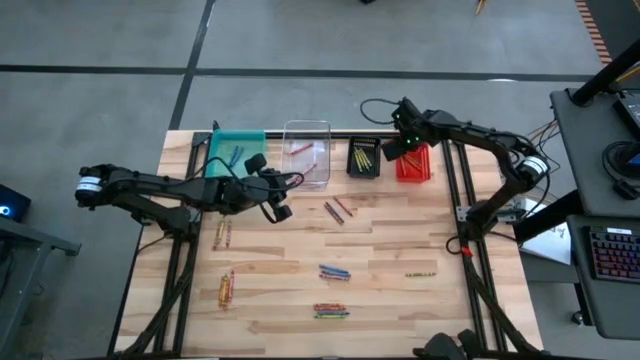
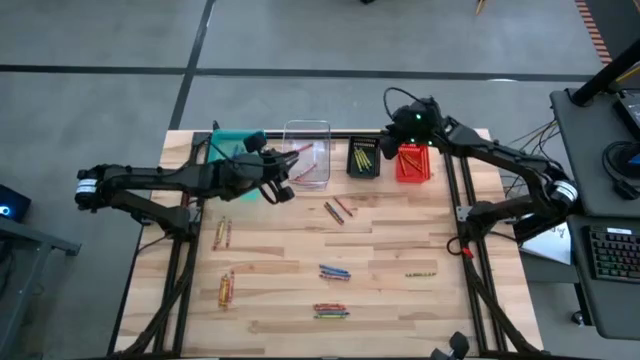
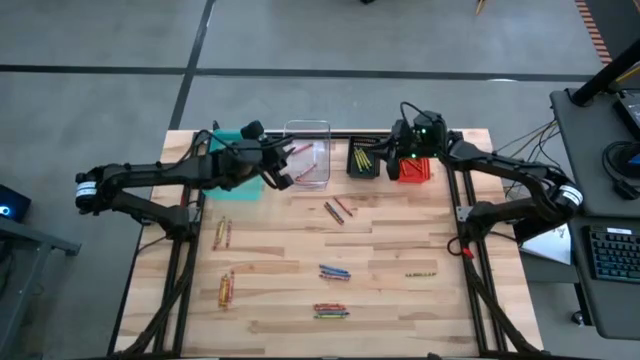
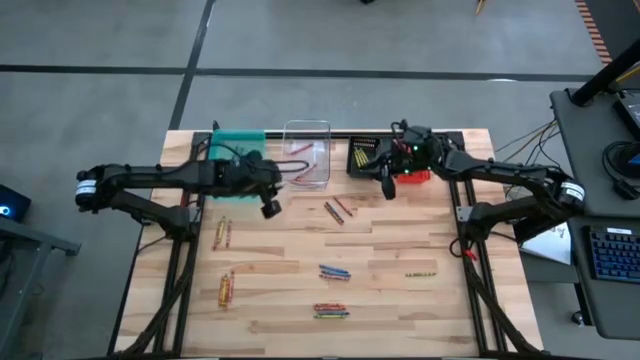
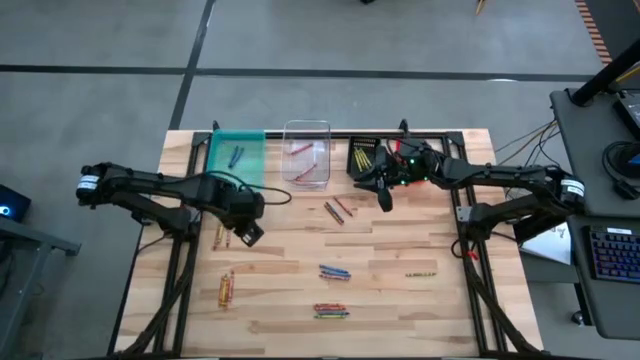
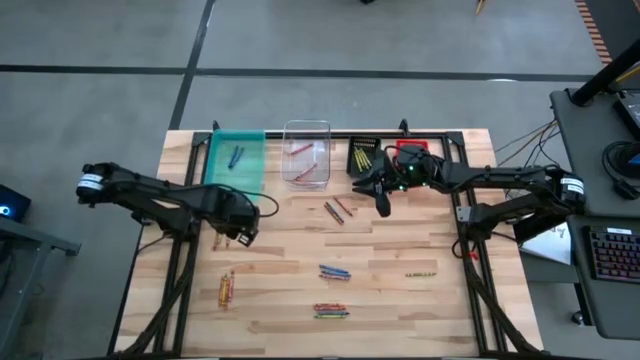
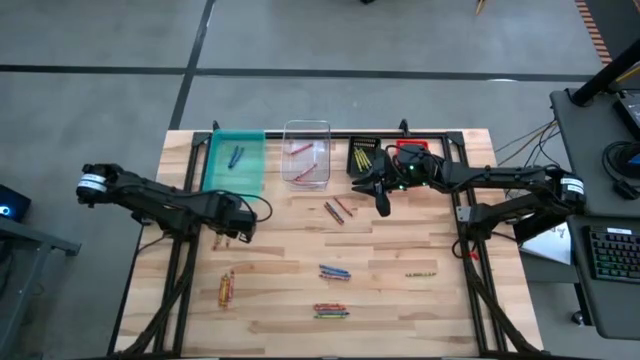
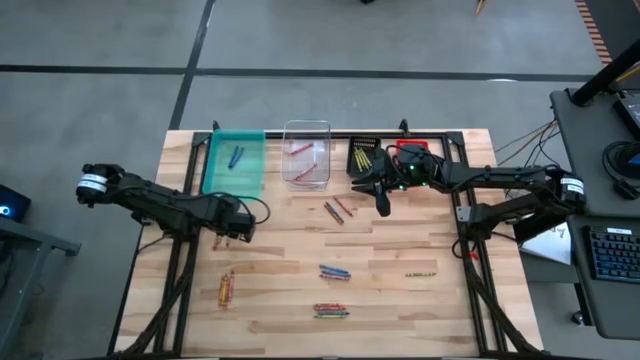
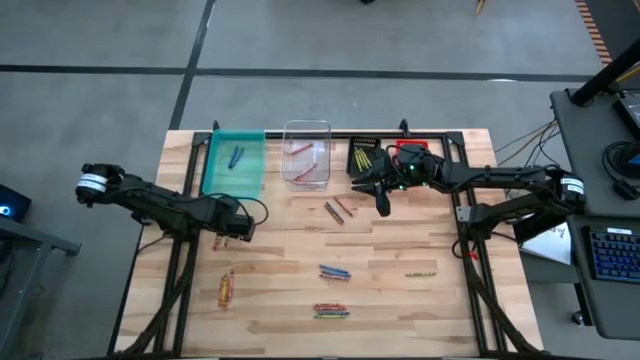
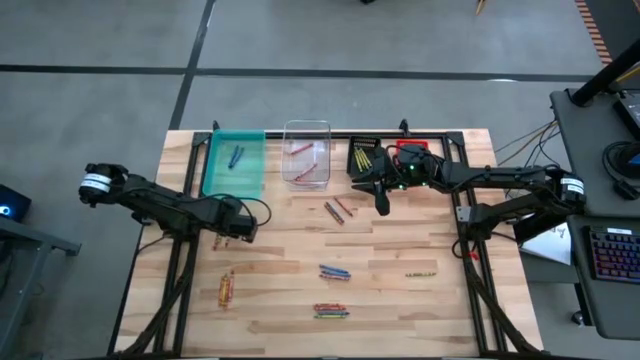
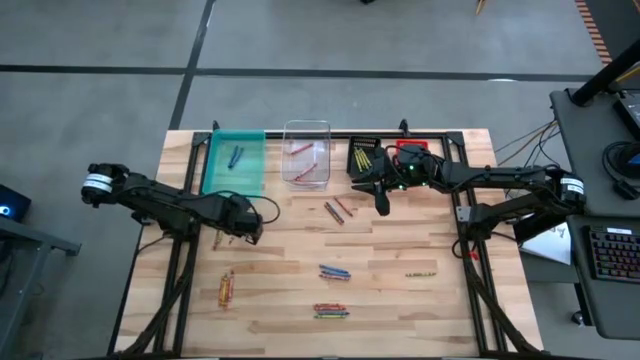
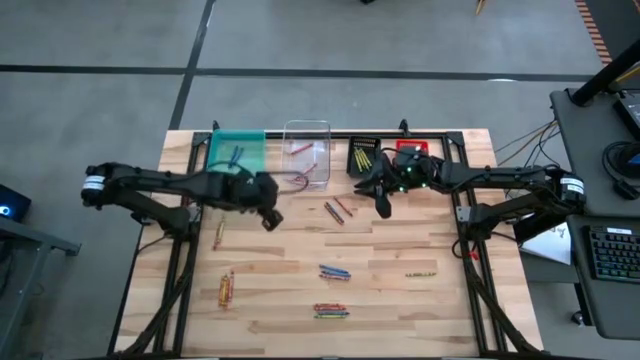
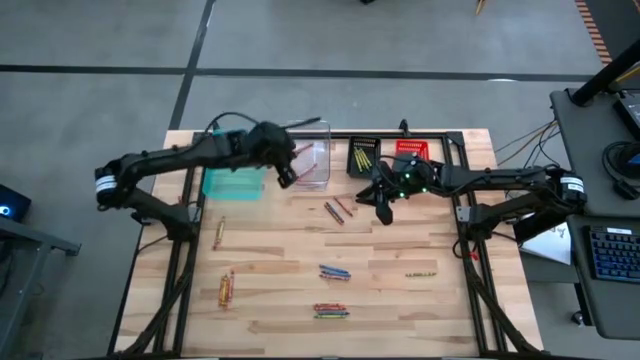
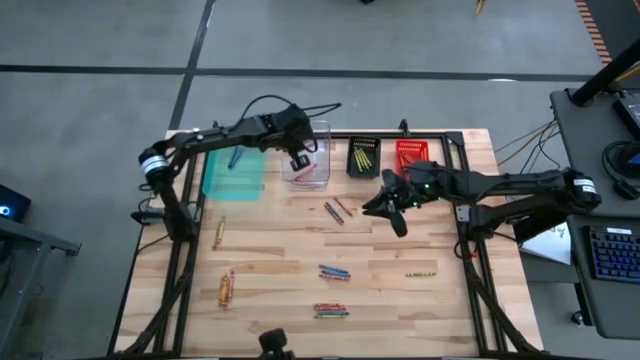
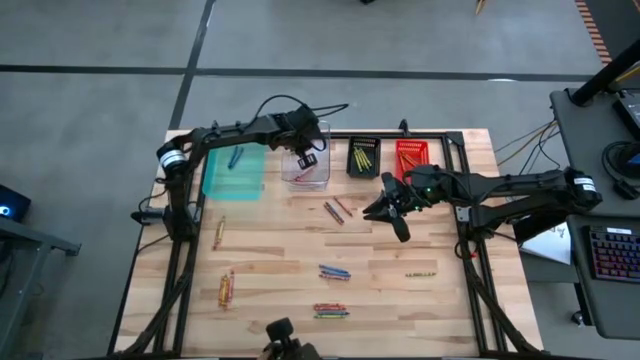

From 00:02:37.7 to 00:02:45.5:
Task: Sort crayons
Put the red crayon into the transparent bin

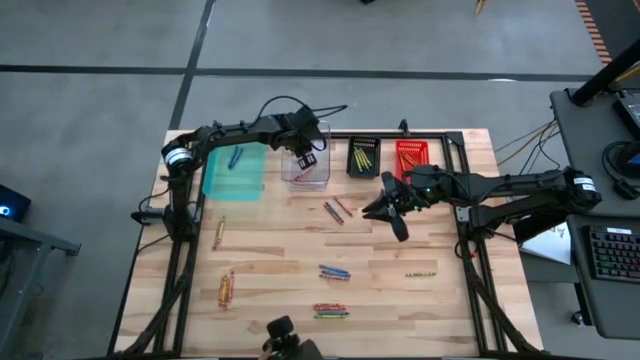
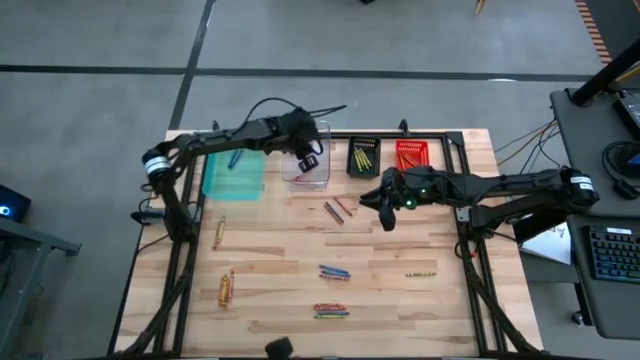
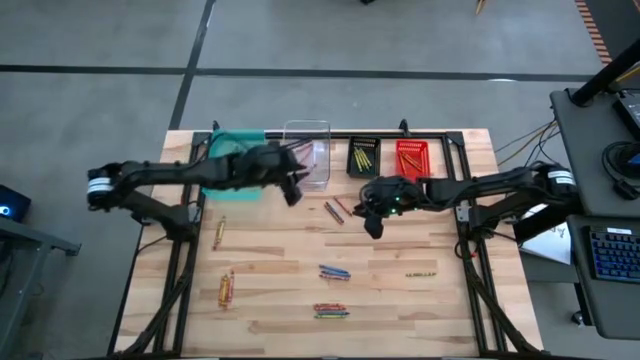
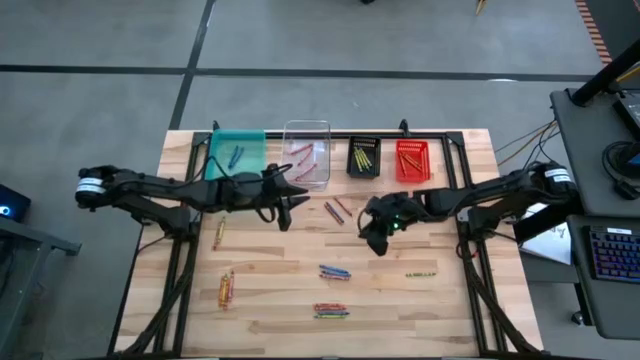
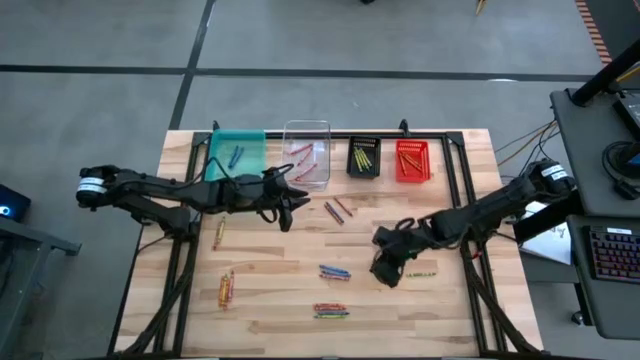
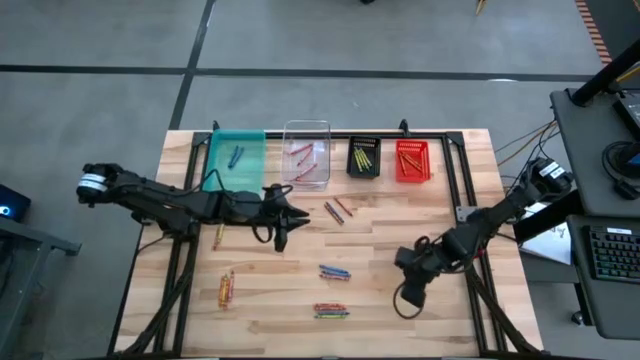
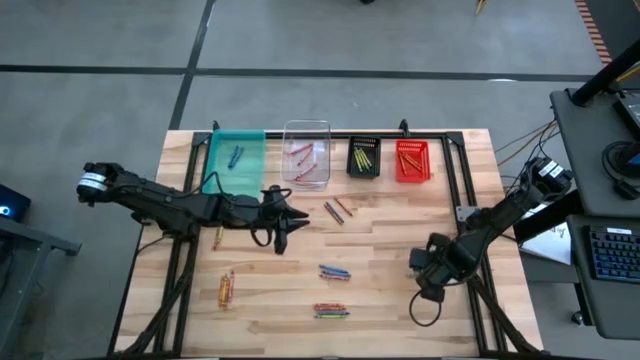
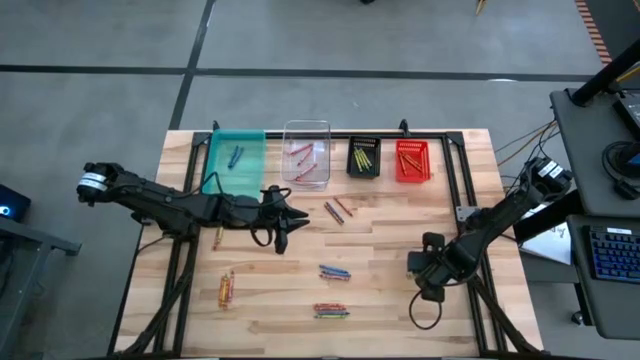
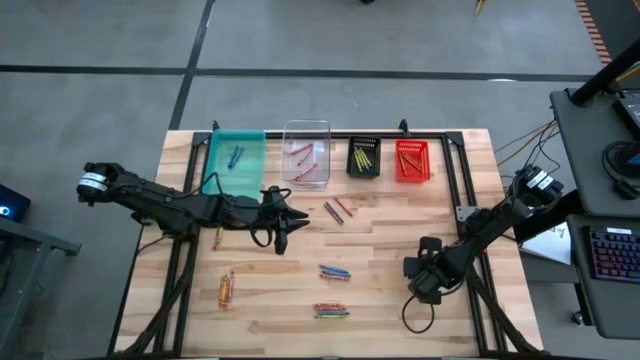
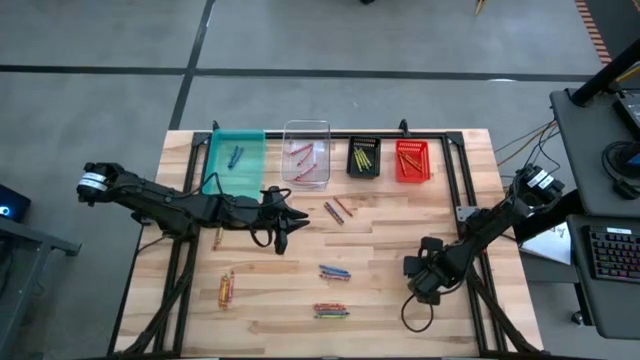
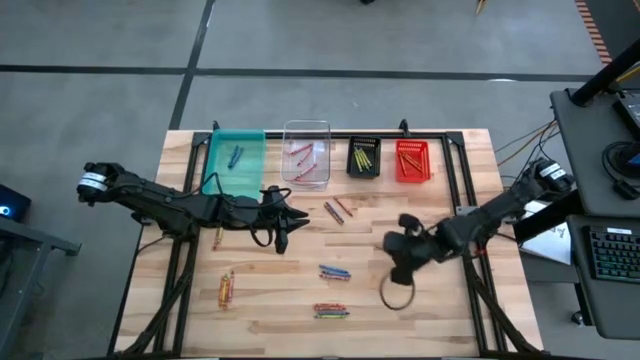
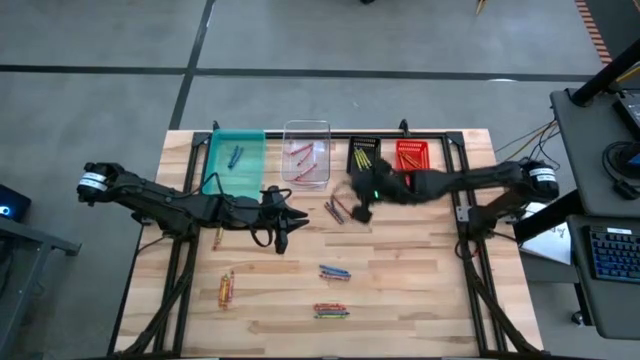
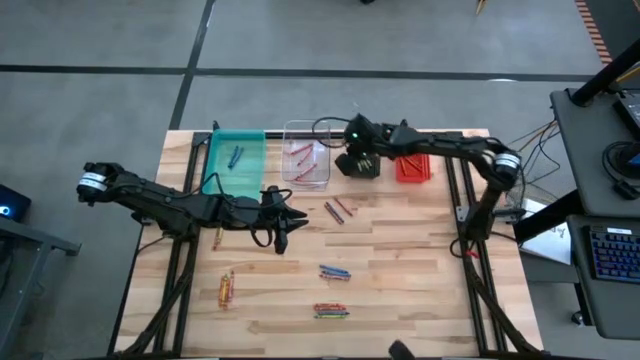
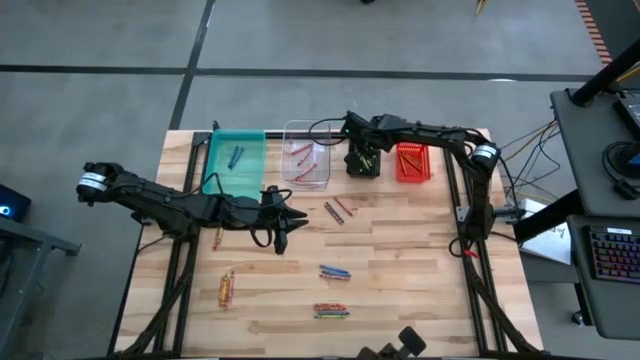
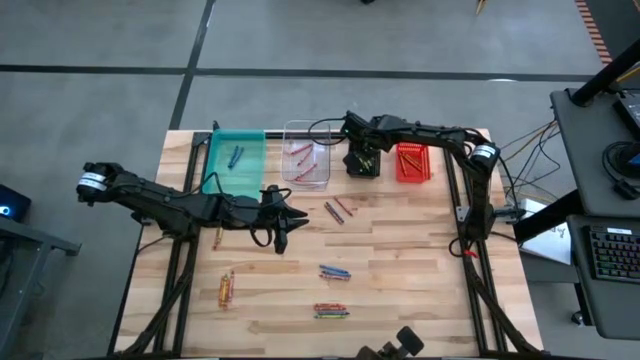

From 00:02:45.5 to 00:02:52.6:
Put the green crayon into the black bin

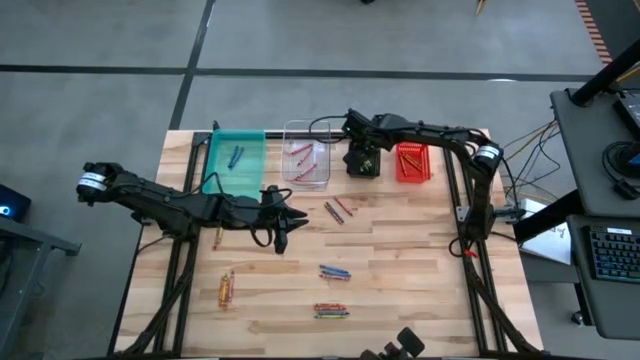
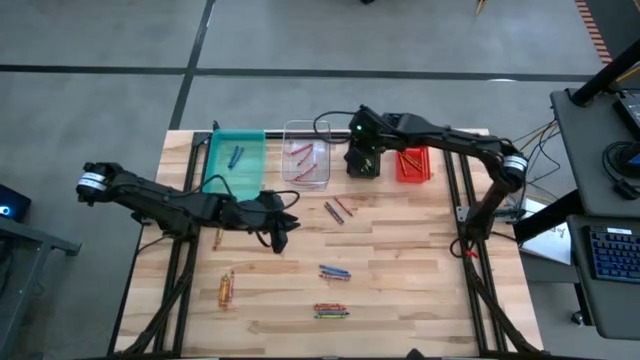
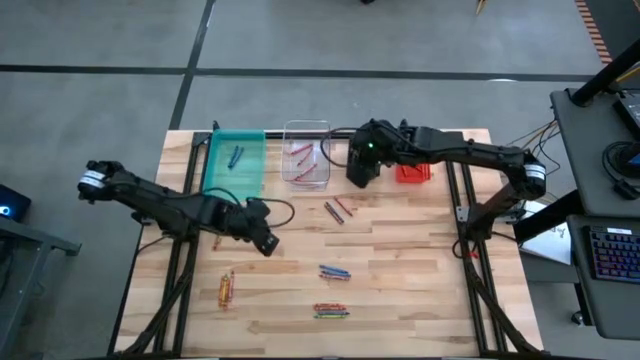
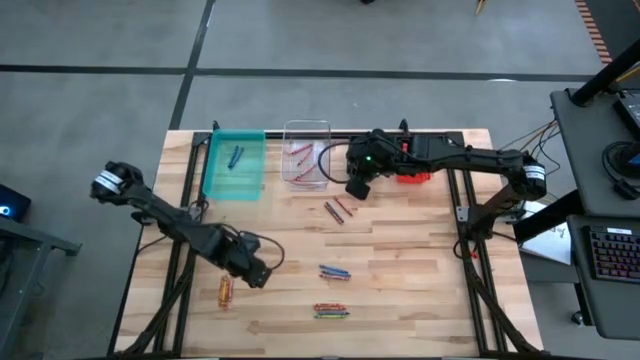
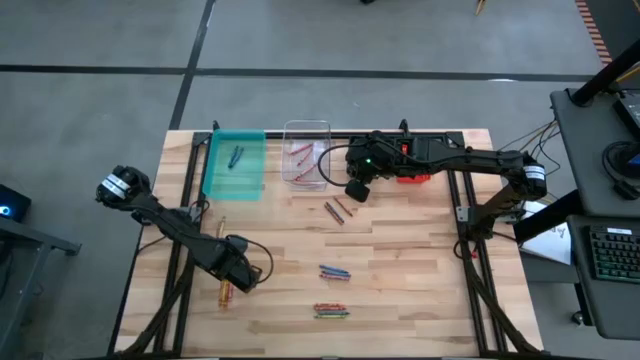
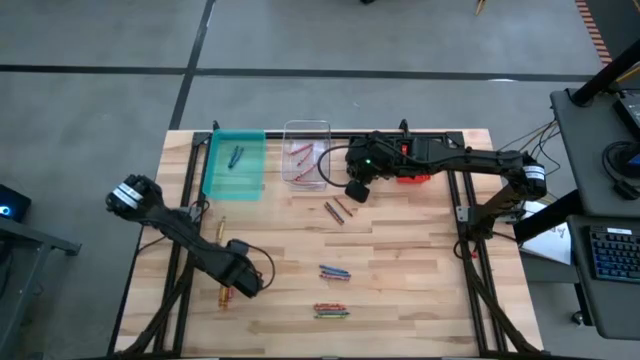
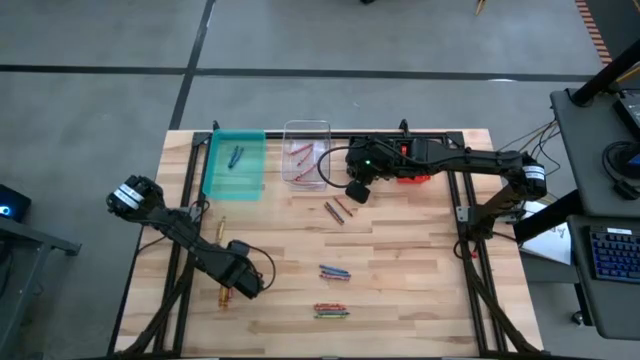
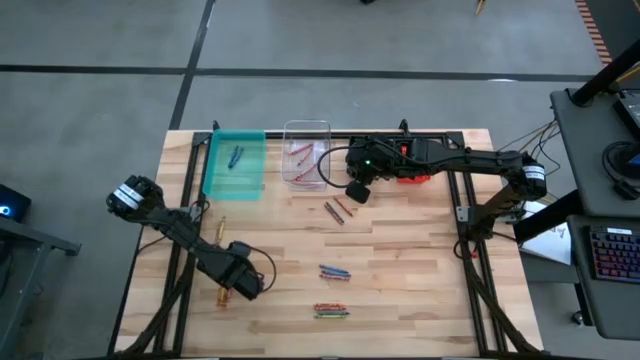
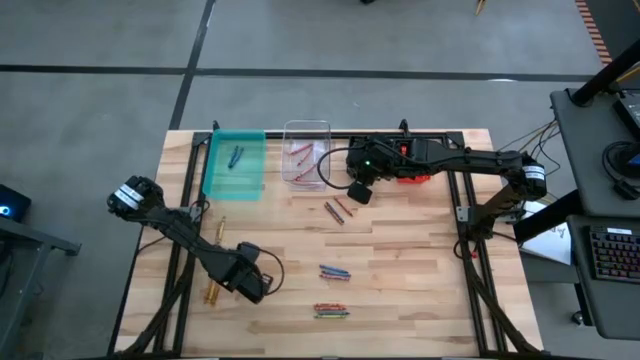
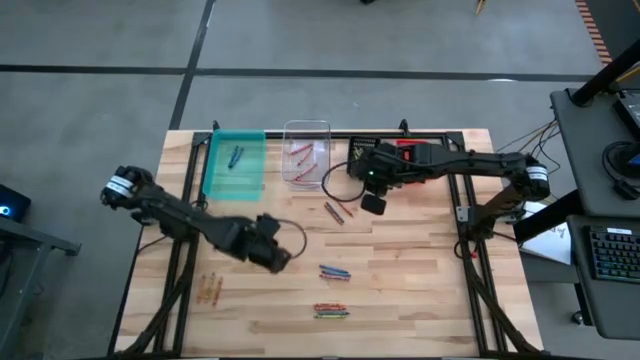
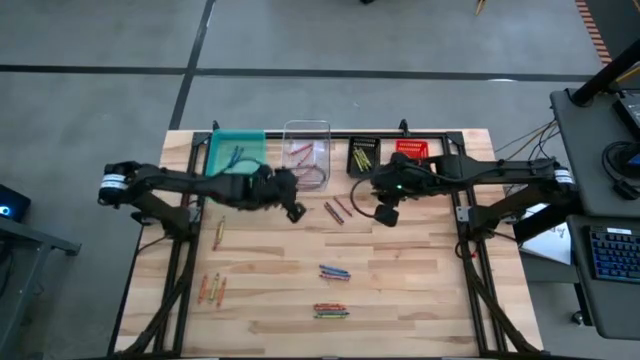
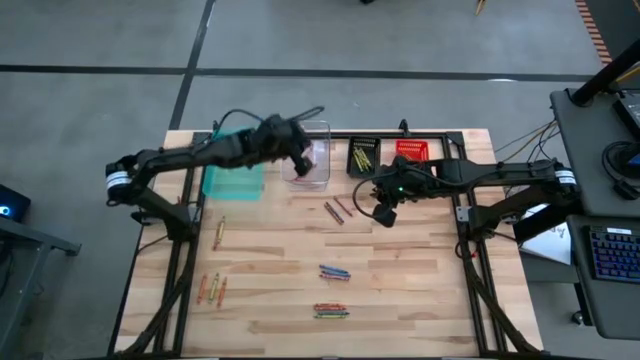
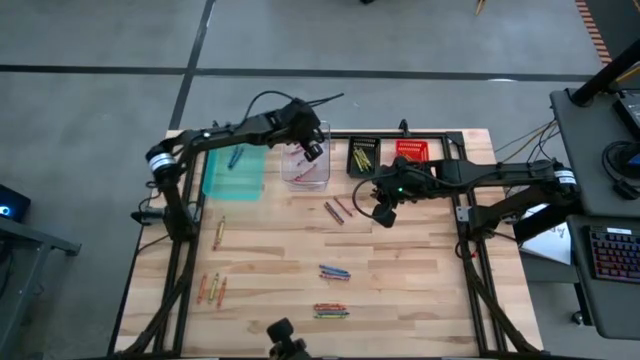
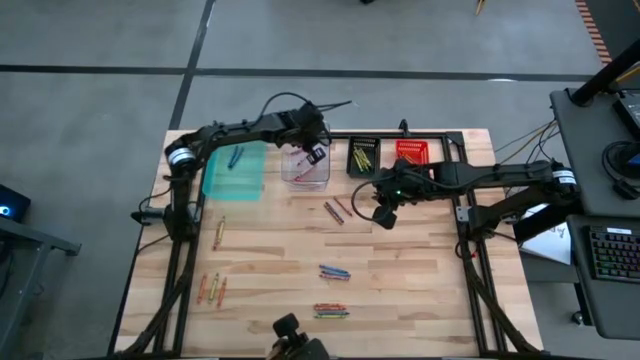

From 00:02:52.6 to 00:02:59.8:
Put the red crayon into the transparent bin

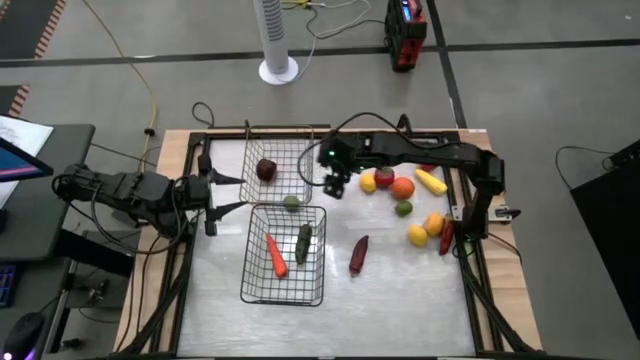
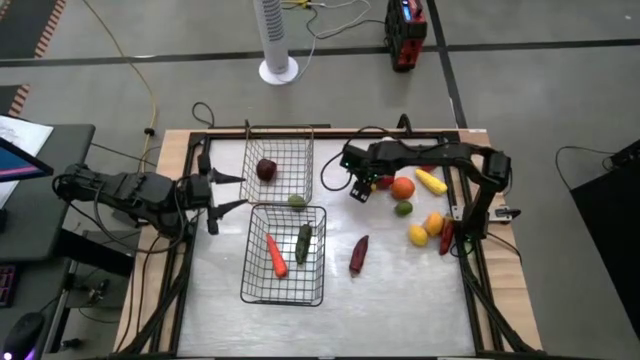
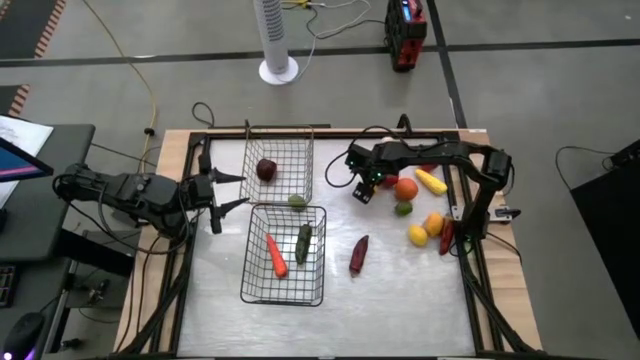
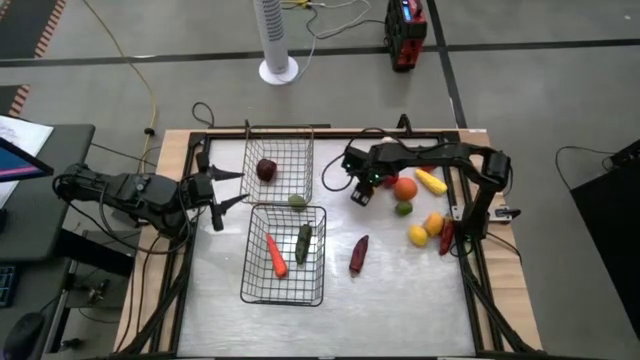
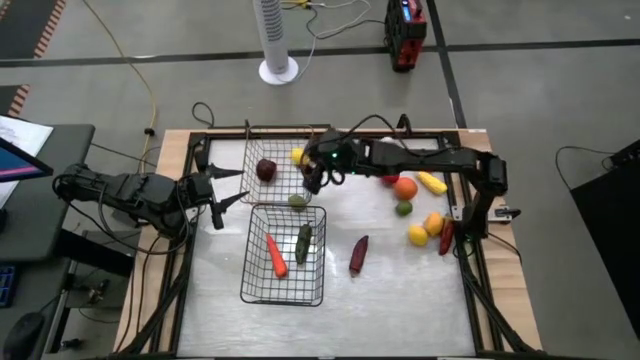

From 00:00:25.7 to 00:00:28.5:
Task: Sort produce into baskets
Put the top lemon into the gold wire basket
